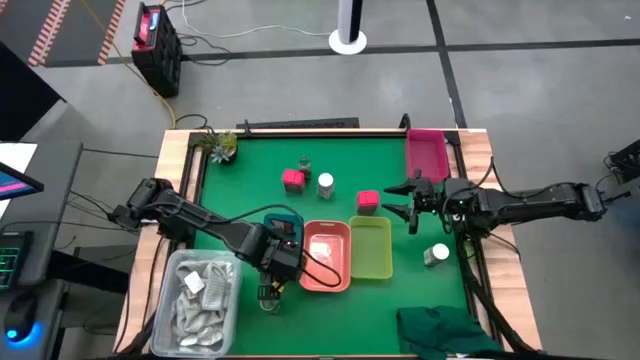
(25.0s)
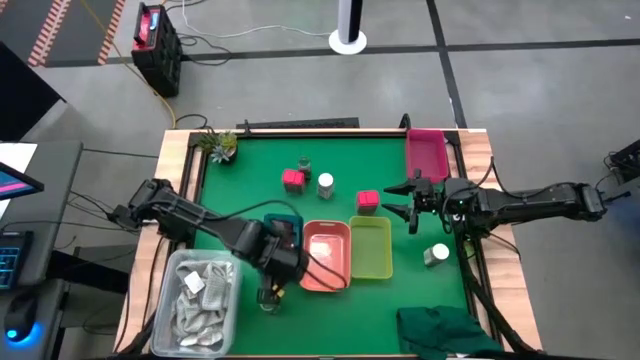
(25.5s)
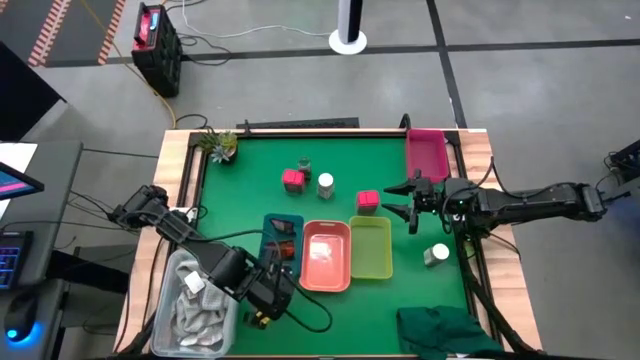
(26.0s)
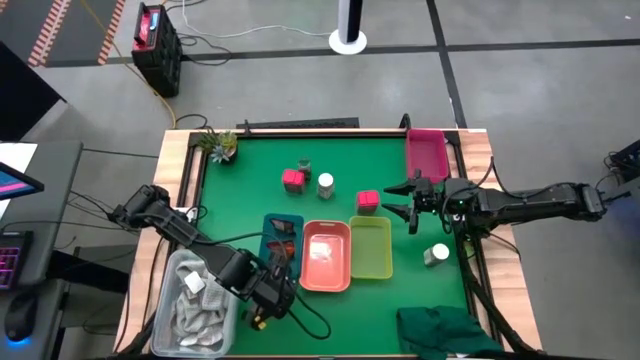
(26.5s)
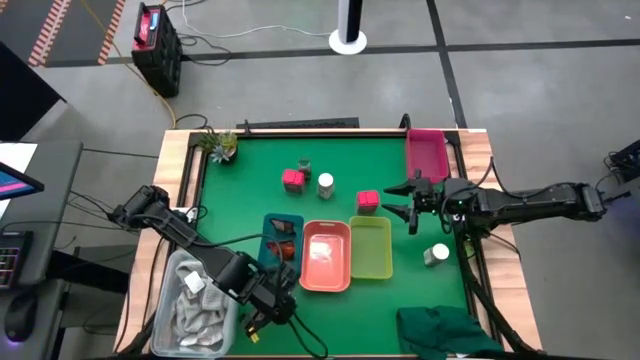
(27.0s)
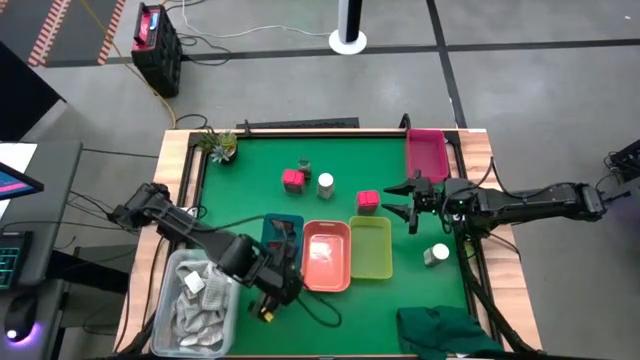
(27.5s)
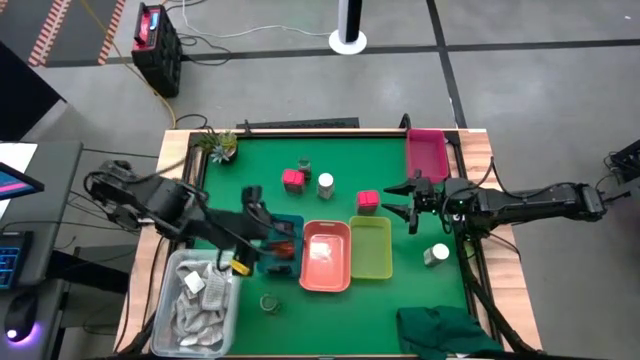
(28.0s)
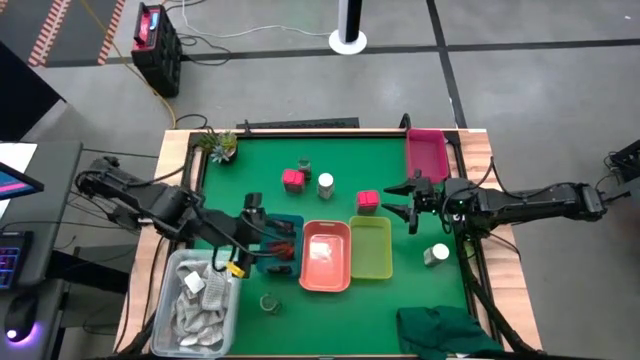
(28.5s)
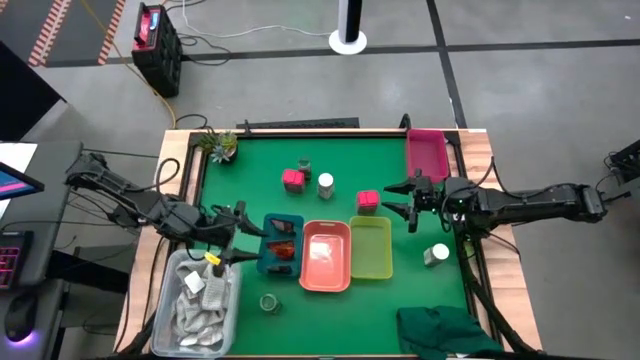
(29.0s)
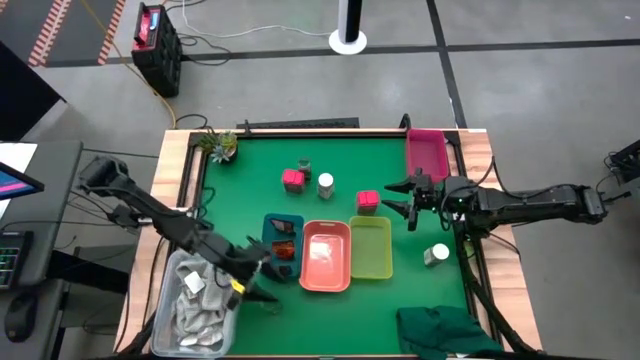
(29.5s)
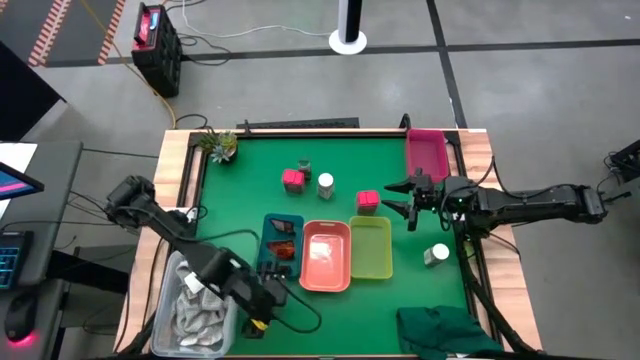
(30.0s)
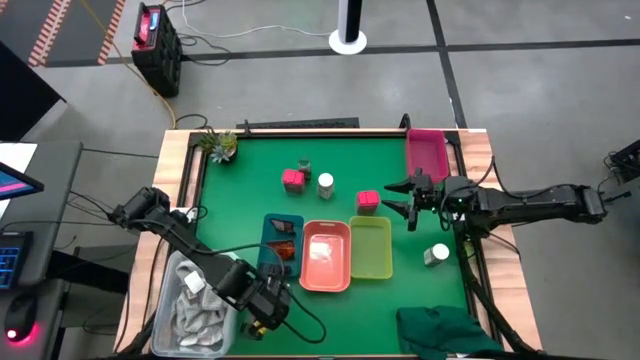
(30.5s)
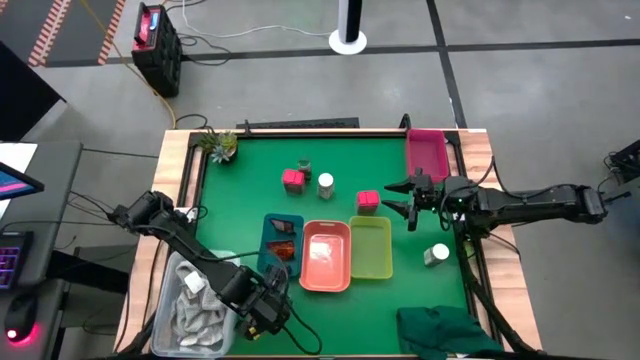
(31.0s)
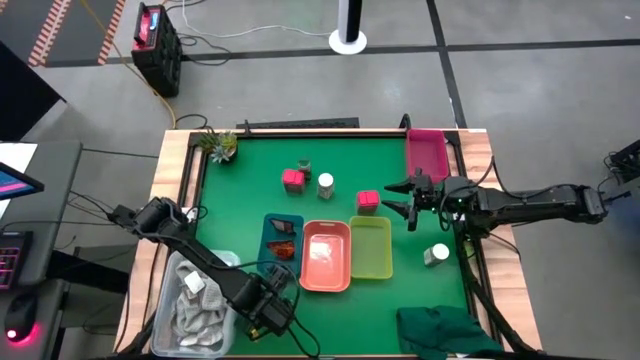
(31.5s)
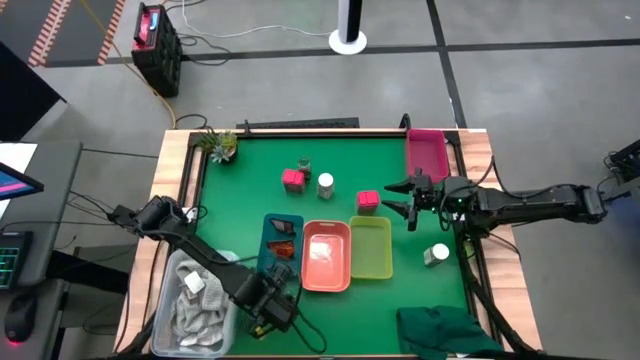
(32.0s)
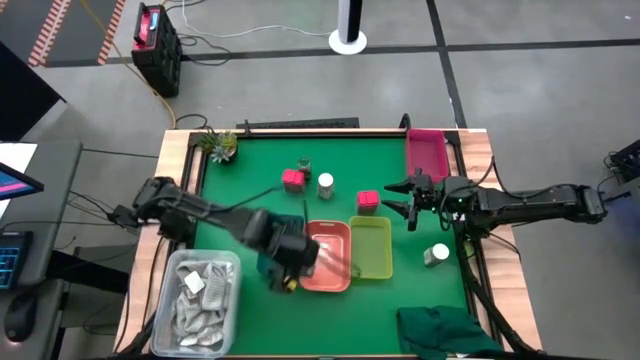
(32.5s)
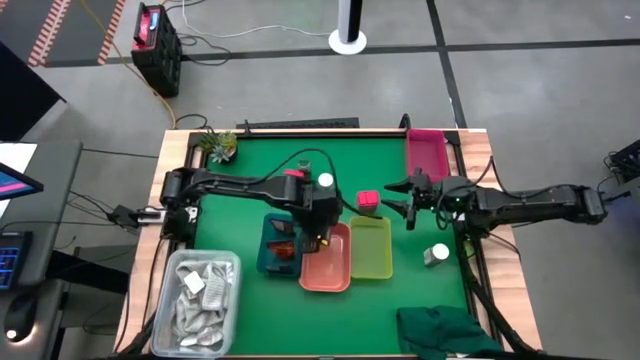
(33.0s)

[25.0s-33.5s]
Task: Sort spices by type
Put the bottom green seasoning bottle into the orange bin

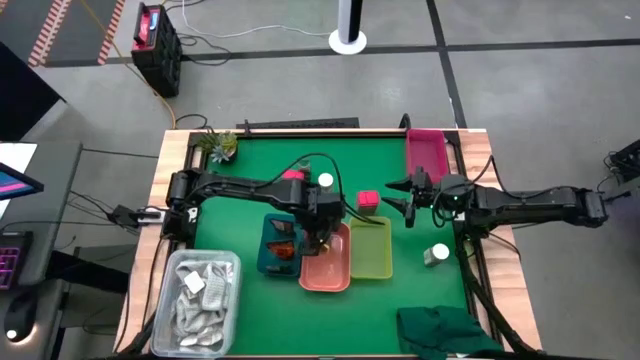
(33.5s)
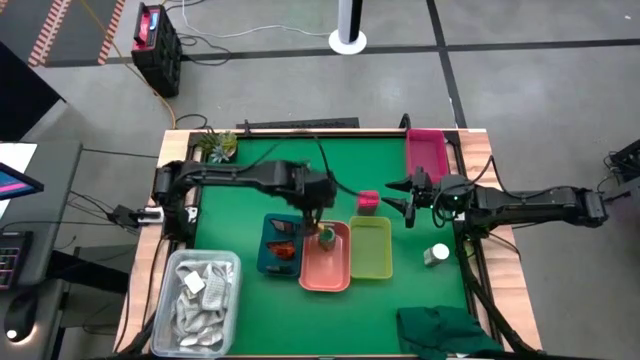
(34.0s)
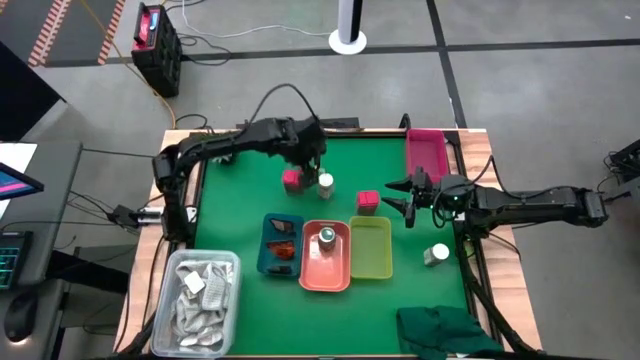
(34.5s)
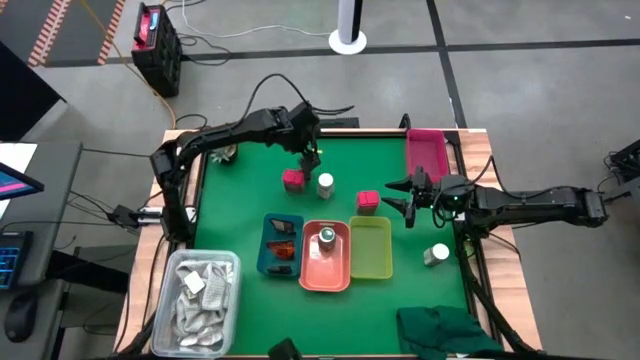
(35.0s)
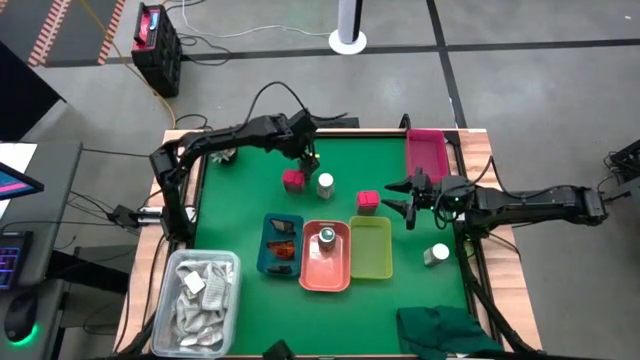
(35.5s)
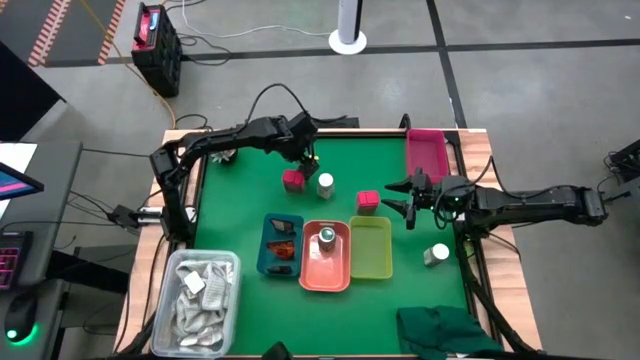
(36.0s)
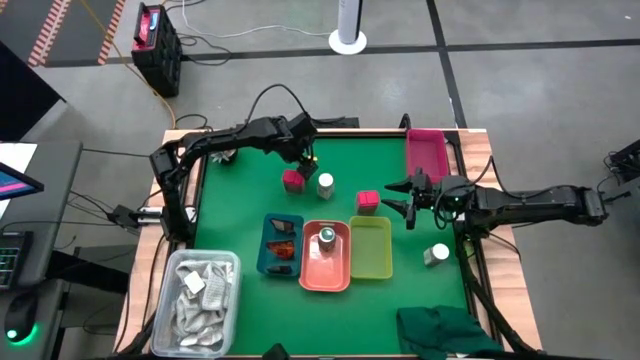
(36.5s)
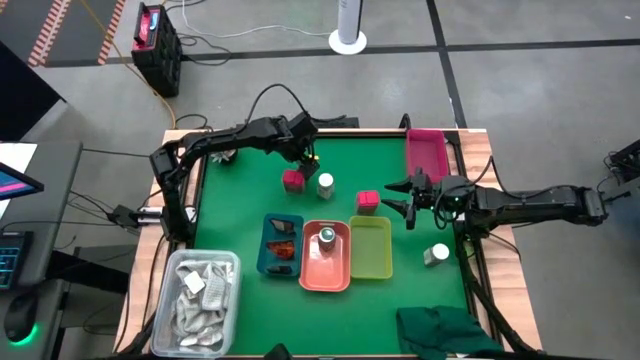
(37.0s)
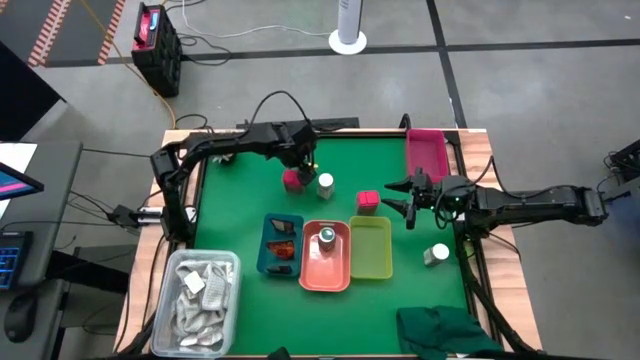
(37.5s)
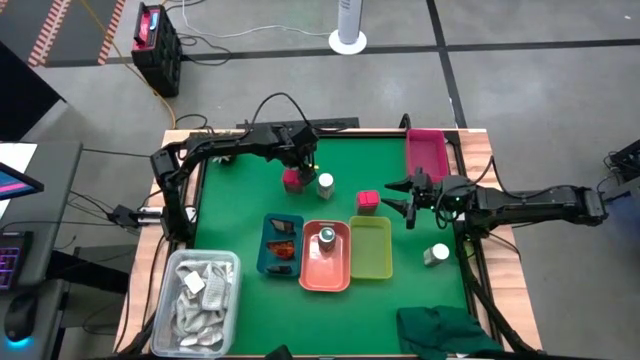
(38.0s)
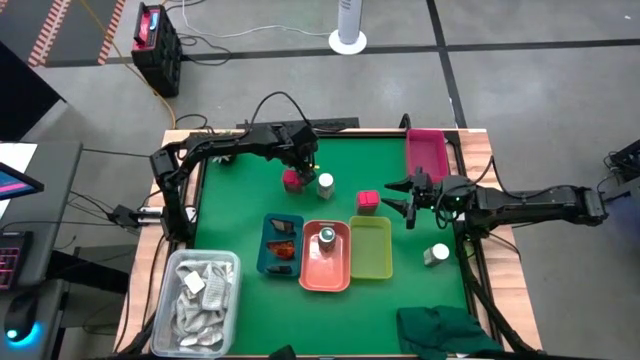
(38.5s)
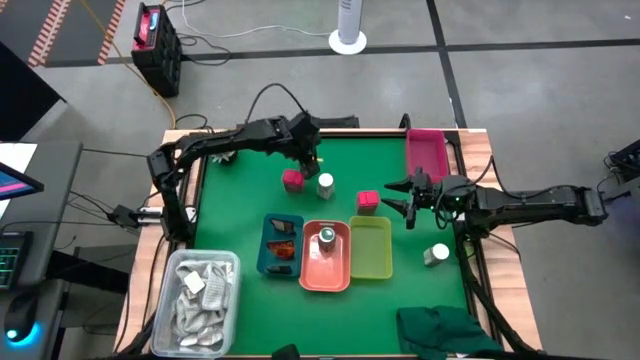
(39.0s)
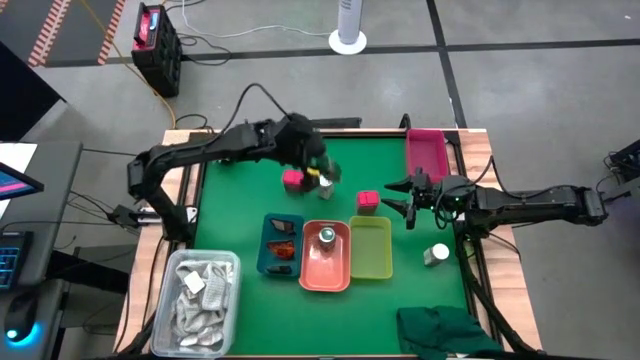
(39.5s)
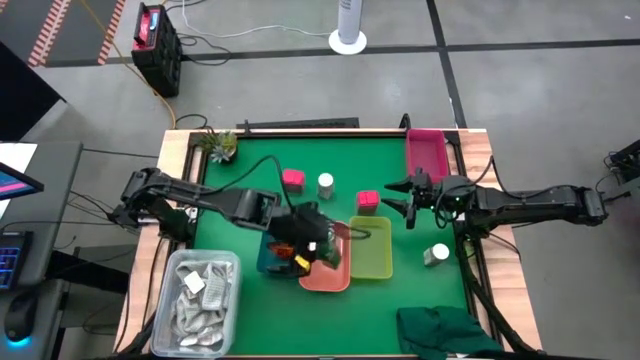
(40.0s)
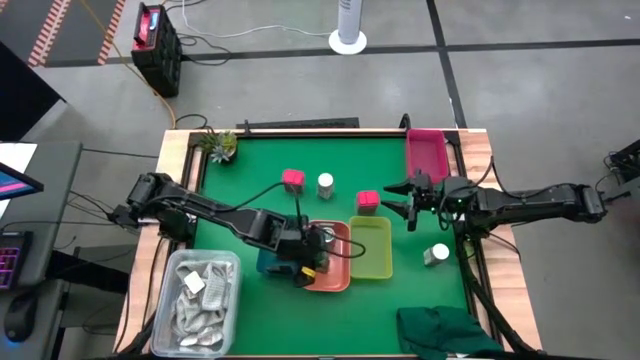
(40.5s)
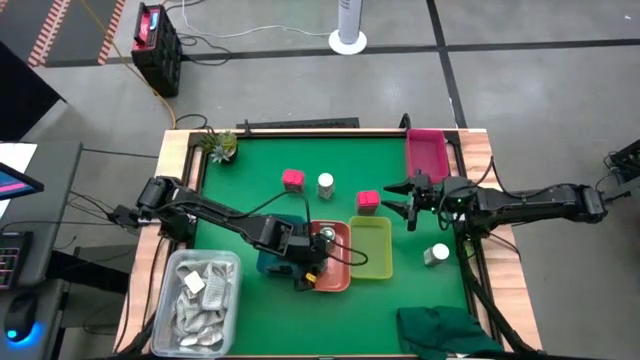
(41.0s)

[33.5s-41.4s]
Put the green seasoning bottle into the orange bin

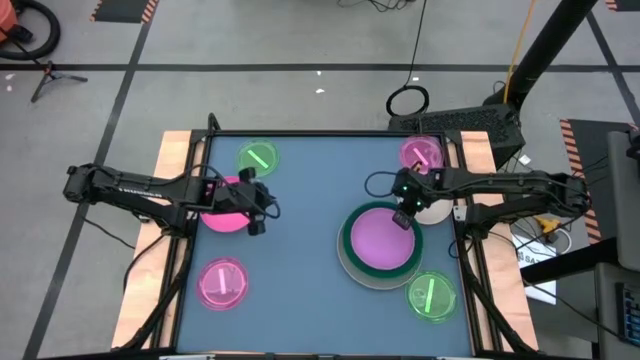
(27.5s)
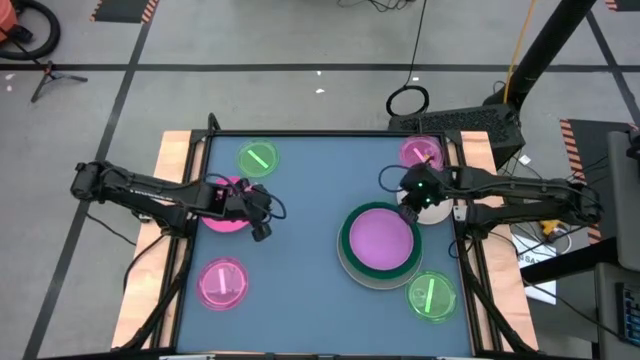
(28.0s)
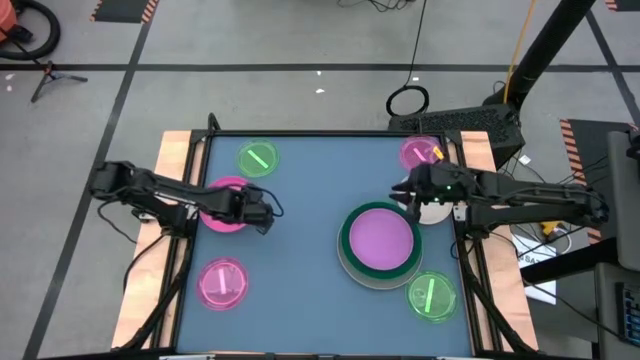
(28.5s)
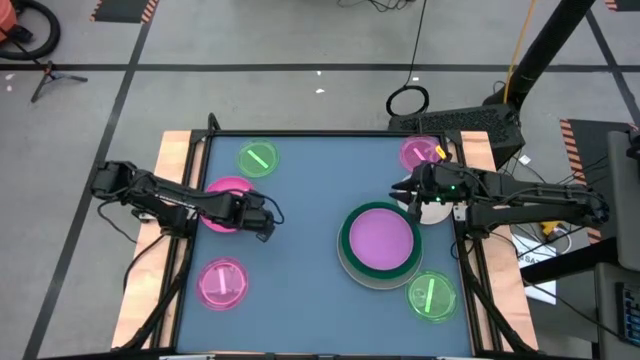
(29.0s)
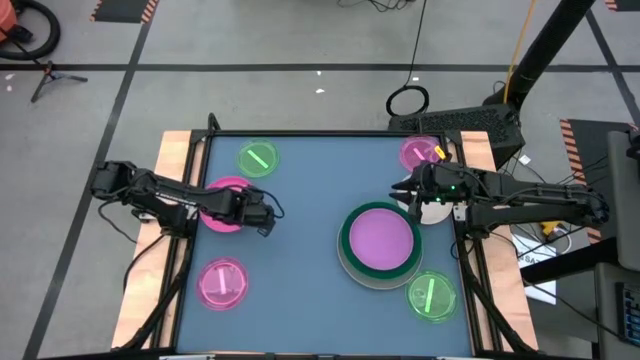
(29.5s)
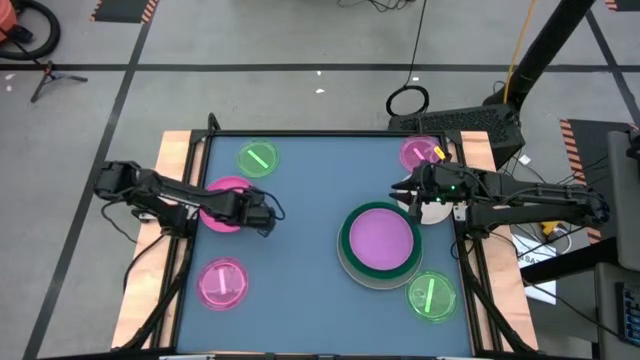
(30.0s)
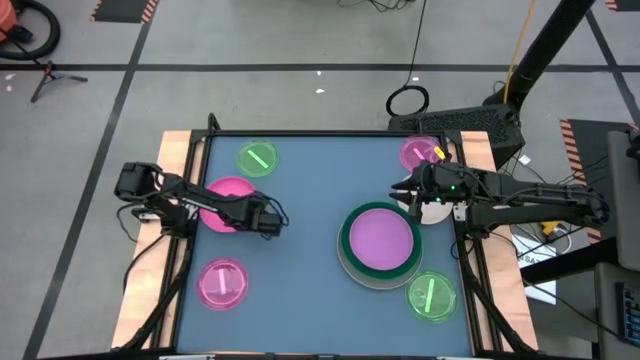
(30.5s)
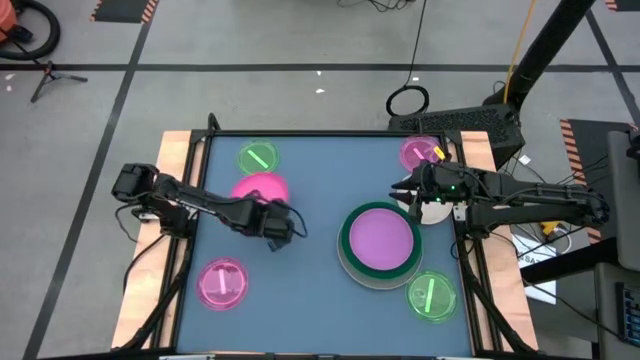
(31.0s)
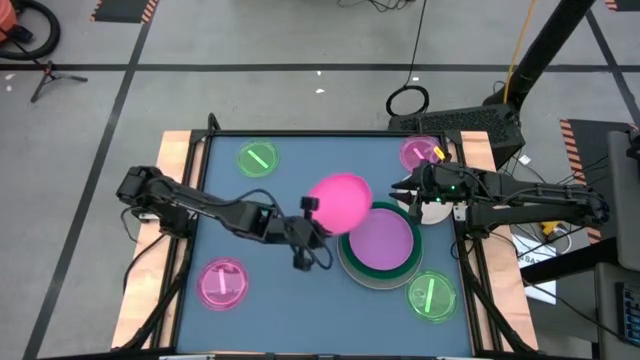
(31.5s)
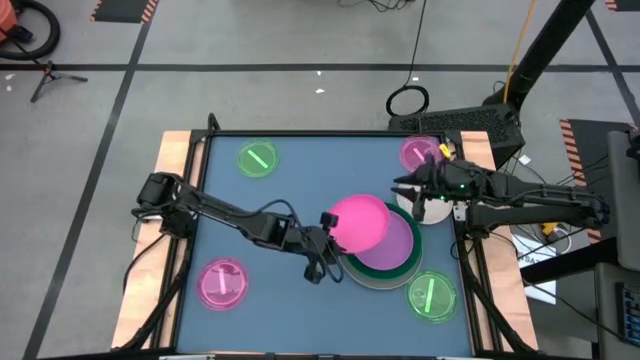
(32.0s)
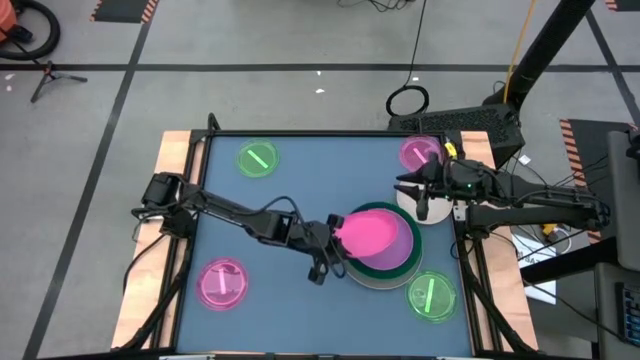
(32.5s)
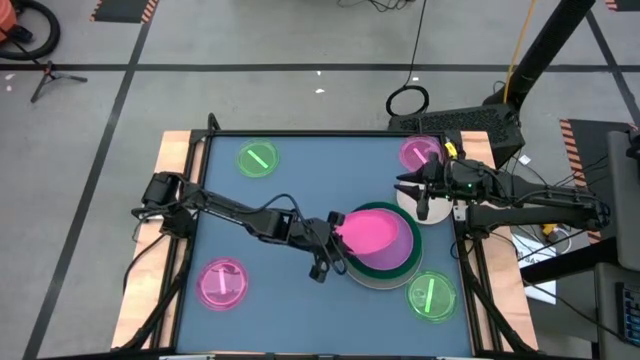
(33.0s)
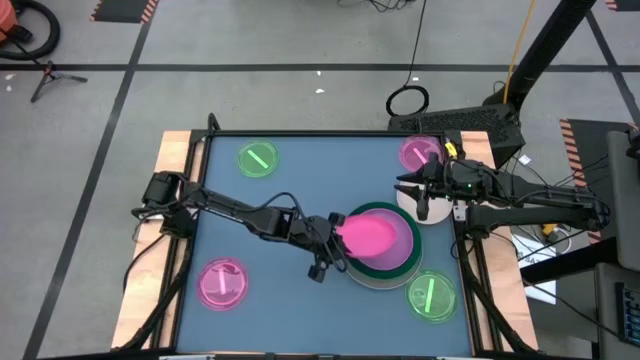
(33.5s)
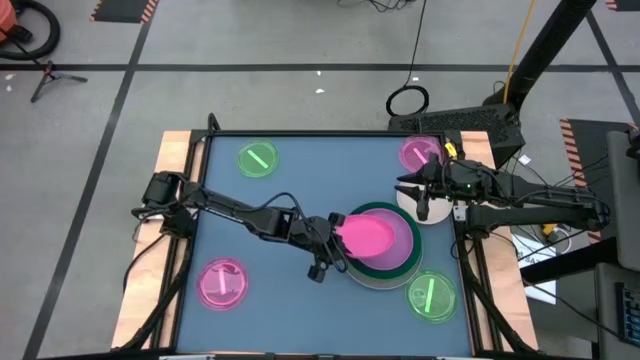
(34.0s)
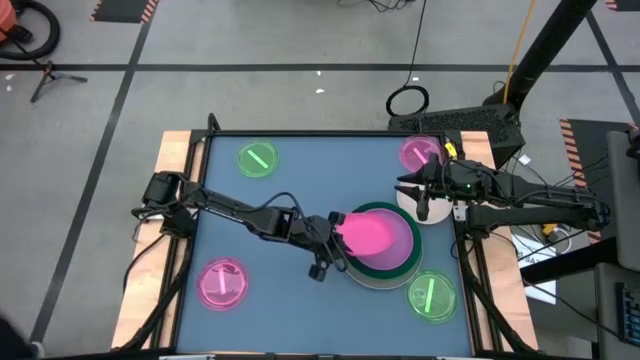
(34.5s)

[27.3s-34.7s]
Task: Stack plastic plates
Stack the pink plate on top of the purple plate
